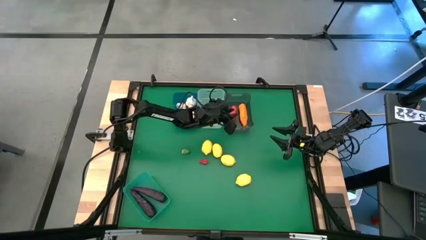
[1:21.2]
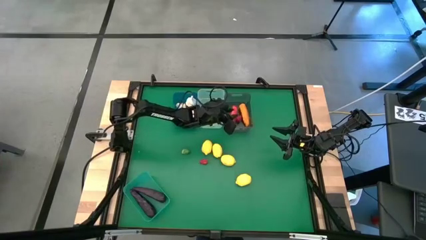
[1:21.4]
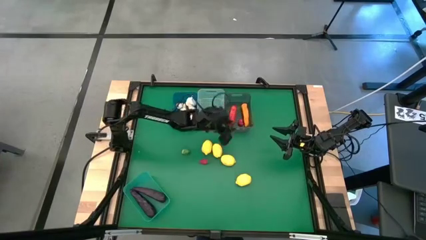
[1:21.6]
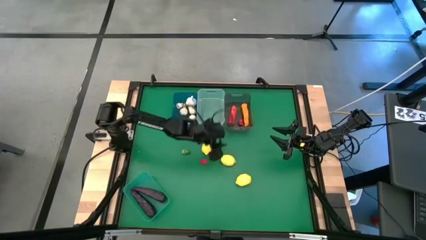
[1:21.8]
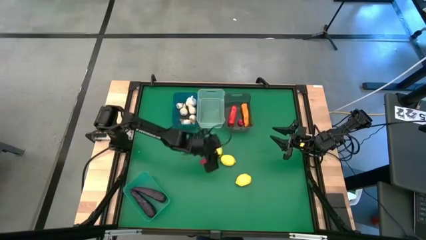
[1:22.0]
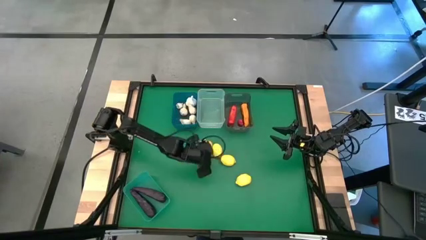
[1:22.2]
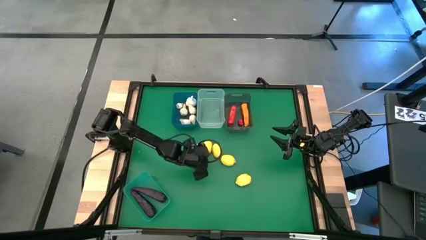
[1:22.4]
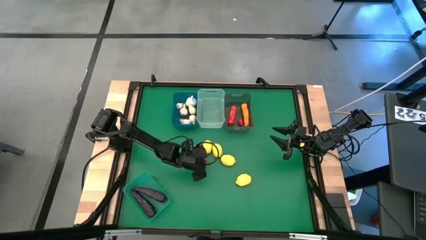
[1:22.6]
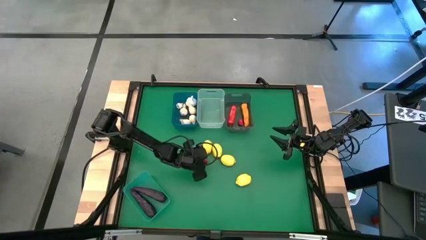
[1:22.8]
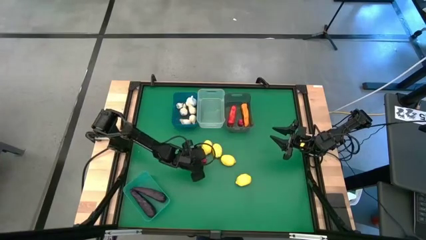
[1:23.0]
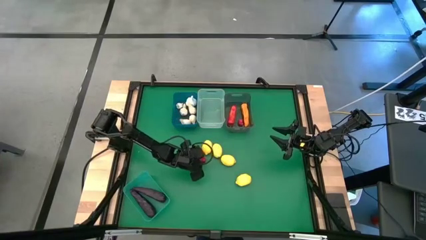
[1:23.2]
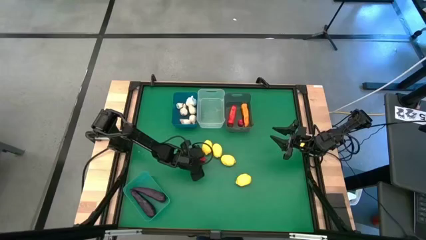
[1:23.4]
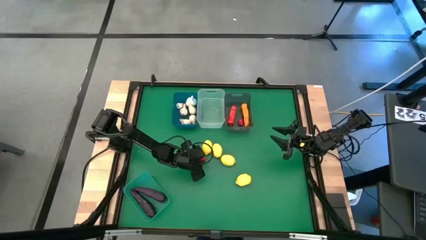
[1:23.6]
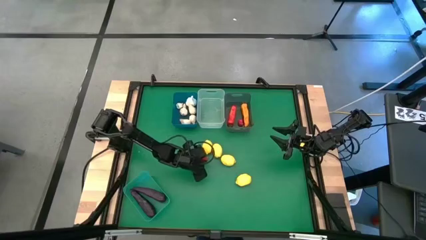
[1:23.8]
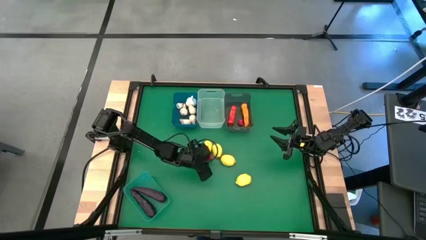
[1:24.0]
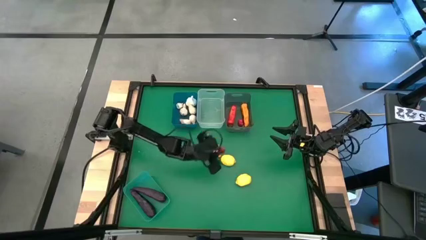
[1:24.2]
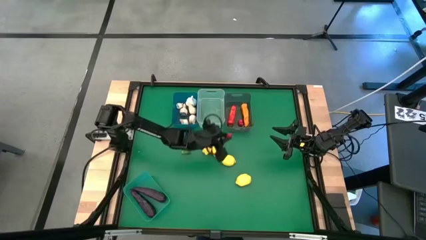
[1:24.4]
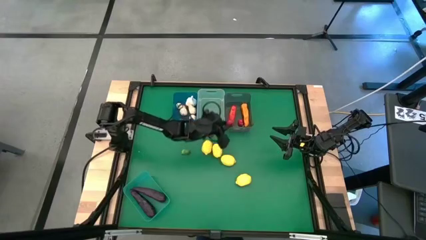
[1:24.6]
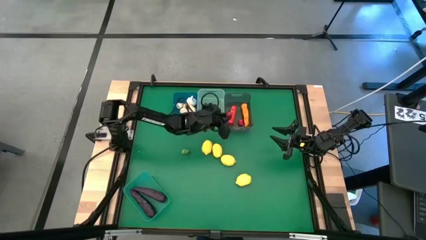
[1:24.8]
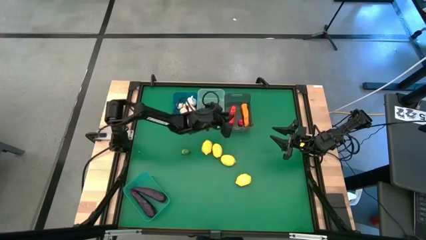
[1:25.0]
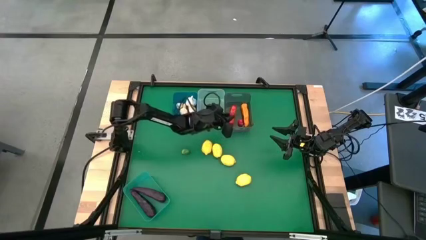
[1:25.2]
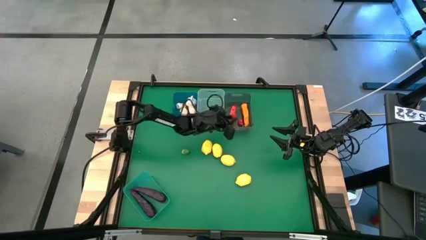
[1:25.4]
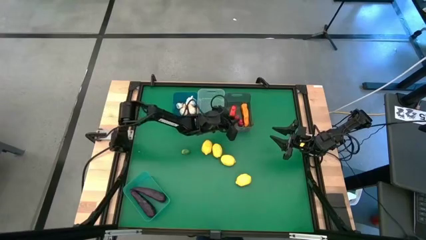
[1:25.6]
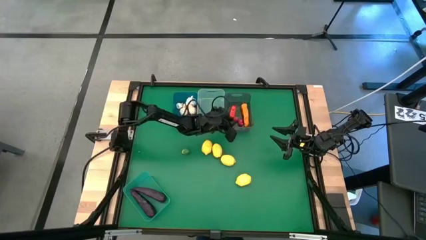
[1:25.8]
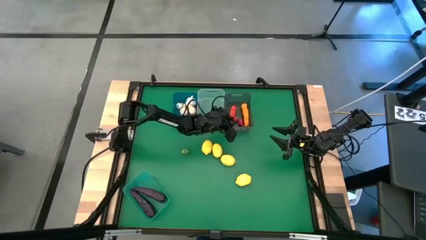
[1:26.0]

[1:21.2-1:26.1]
Task: Sort produce into baskets
Put the red chili pepper into the black bin

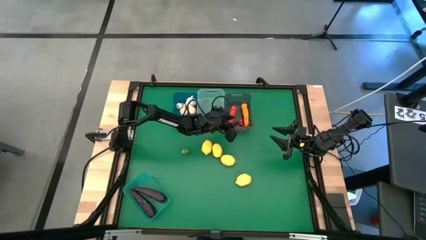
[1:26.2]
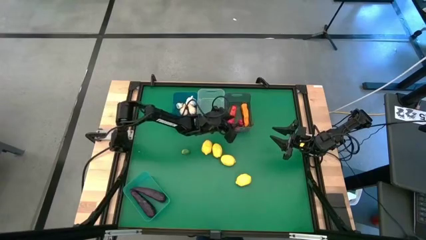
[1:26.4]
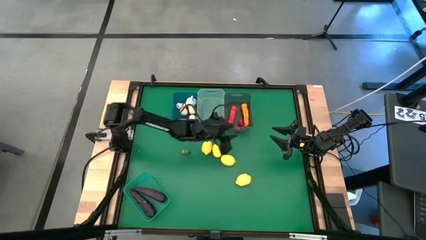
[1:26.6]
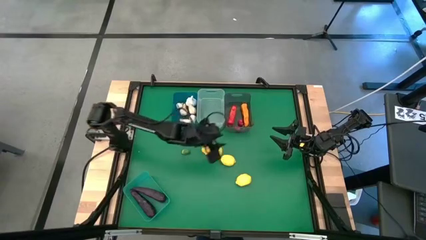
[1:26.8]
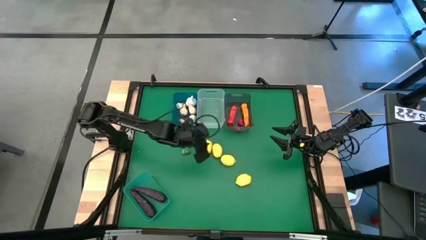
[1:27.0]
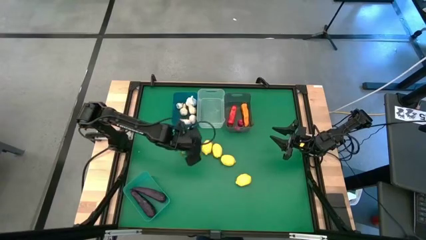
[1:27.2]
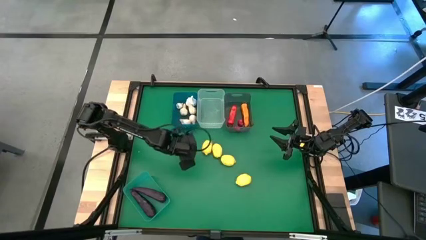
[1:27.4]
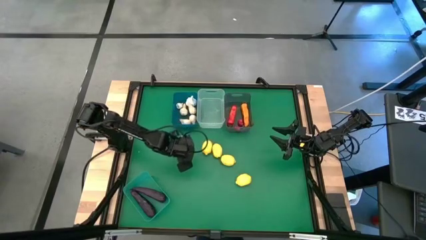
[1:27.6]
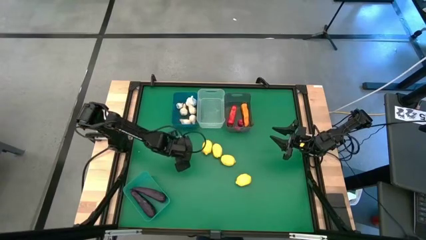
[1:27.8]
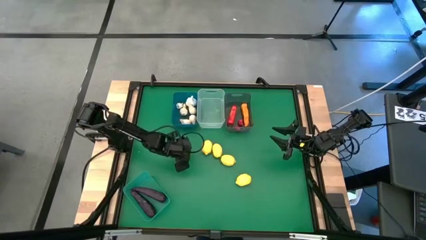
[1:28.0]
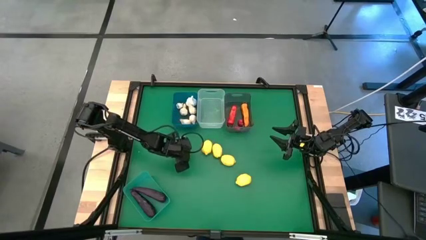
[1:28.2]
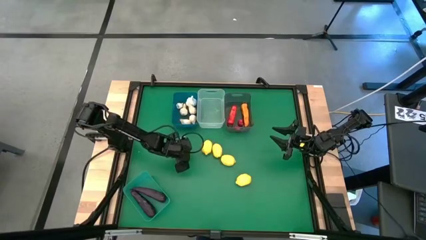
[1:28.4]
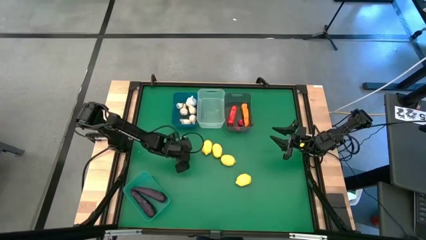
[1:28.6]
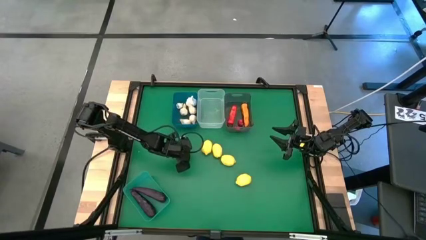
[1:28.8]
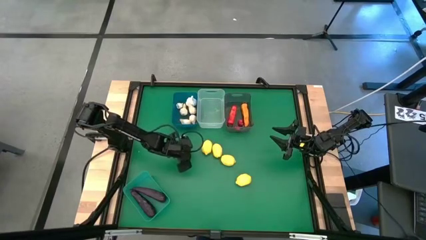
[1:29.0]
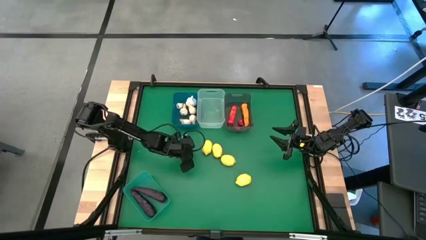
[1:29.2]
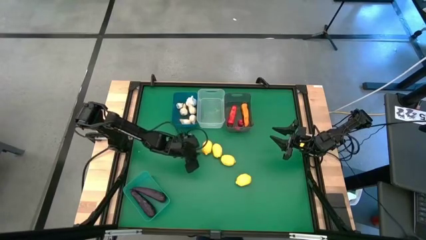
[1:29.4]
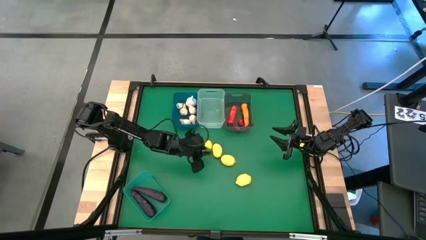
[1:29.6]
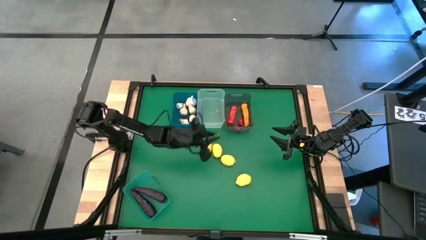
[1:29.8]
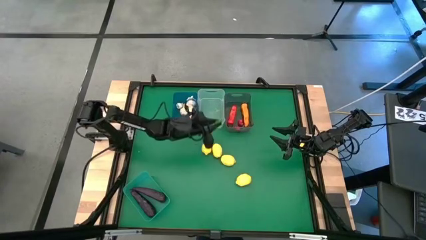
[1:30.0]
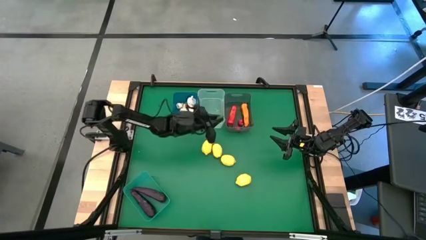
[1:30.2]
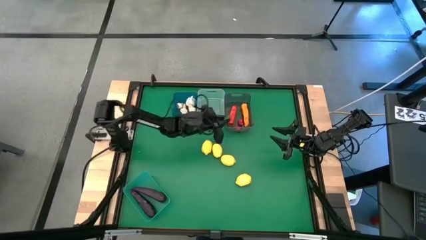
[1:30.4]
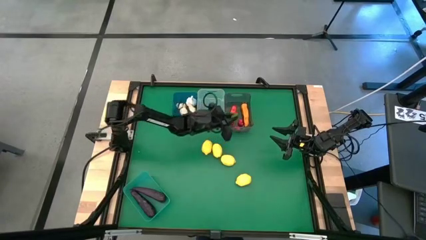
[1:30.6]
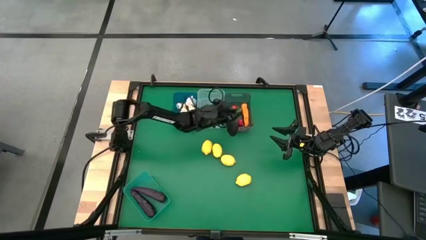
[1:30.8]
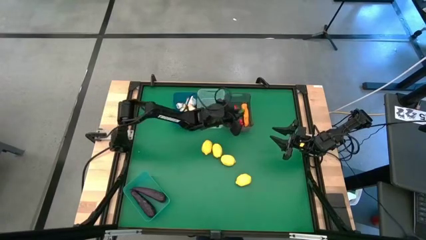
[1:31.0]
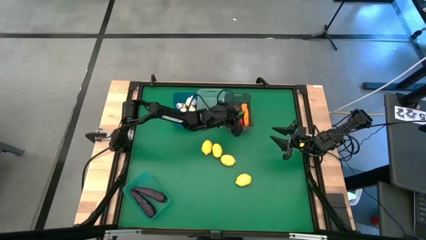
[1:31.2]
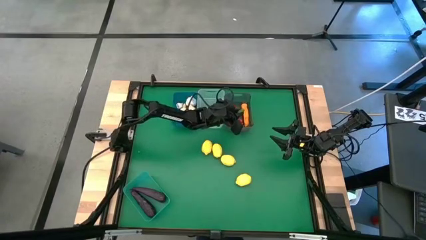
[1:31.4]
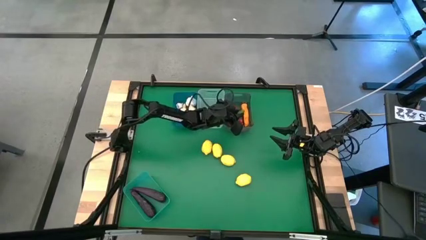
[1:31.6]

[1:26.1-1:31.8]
Put the green chili pepper into the black bin

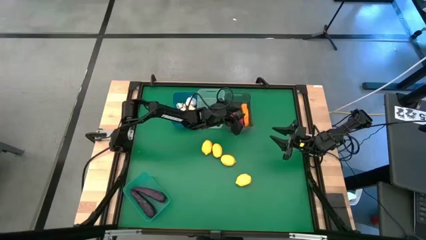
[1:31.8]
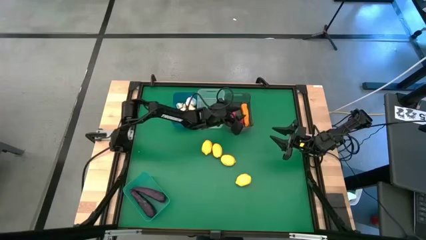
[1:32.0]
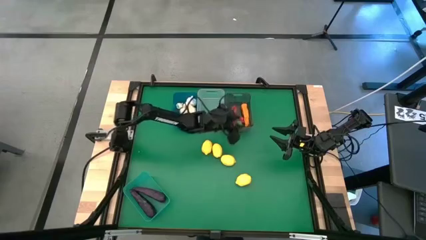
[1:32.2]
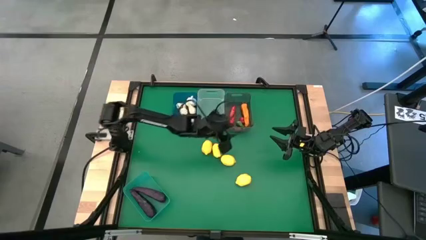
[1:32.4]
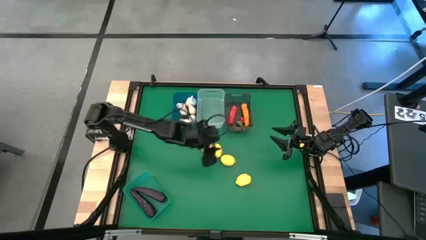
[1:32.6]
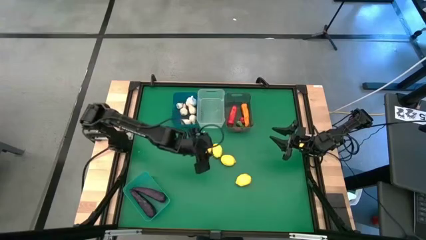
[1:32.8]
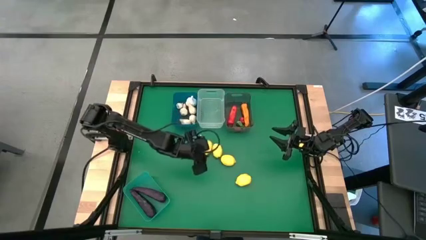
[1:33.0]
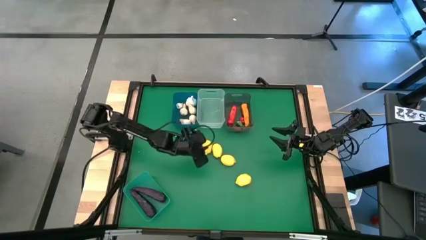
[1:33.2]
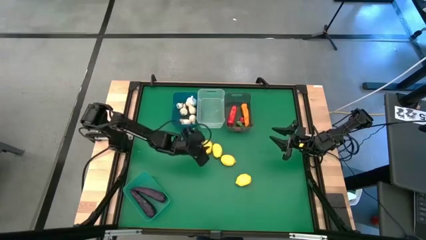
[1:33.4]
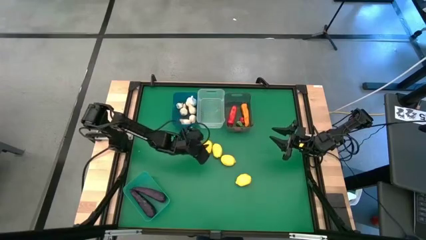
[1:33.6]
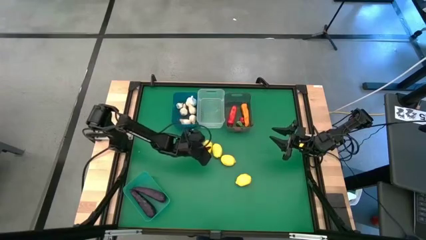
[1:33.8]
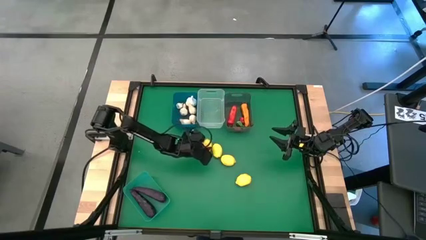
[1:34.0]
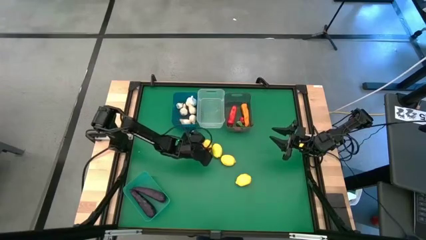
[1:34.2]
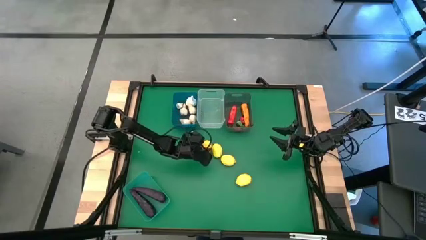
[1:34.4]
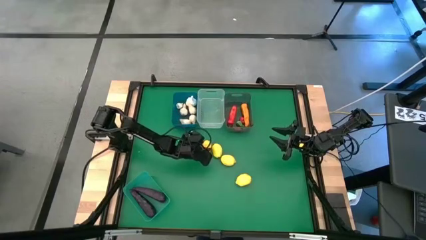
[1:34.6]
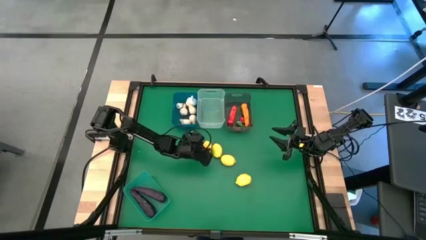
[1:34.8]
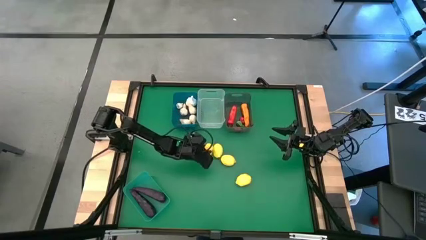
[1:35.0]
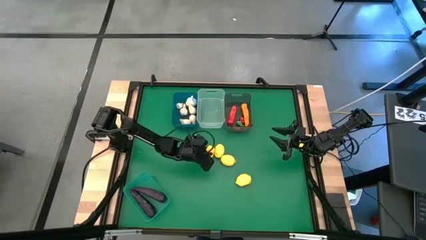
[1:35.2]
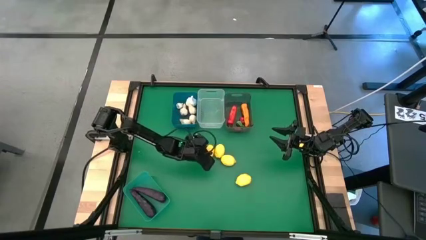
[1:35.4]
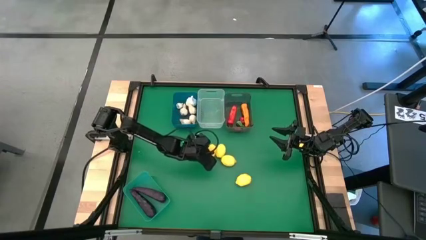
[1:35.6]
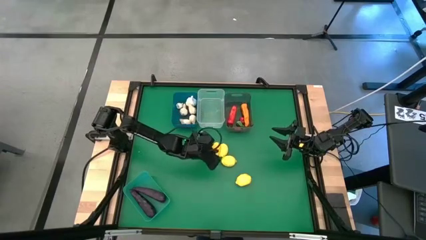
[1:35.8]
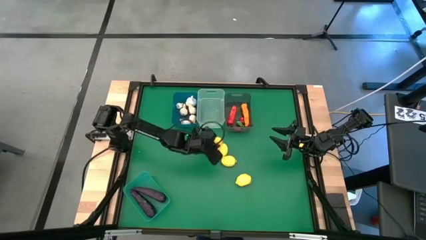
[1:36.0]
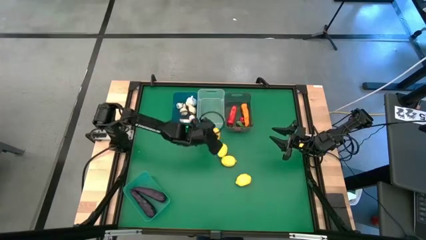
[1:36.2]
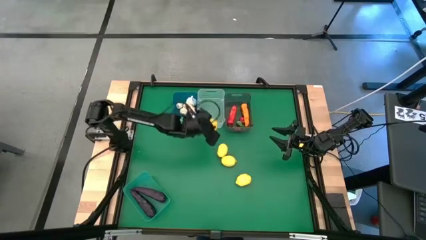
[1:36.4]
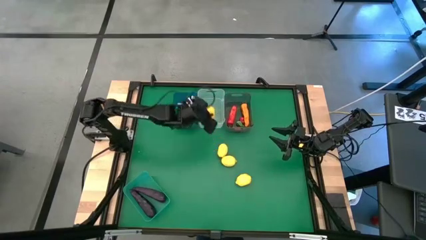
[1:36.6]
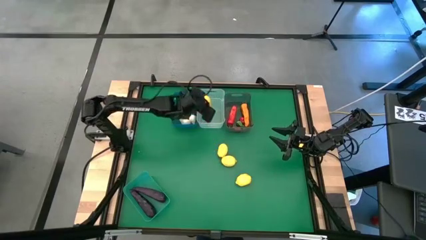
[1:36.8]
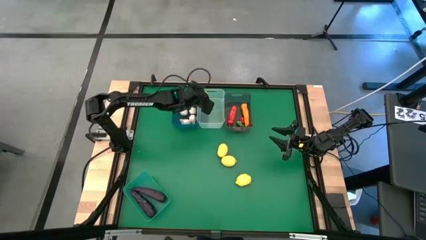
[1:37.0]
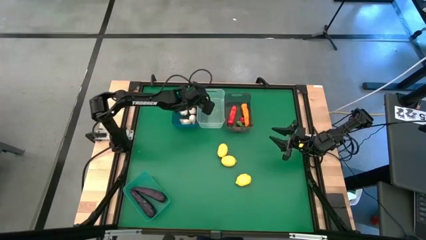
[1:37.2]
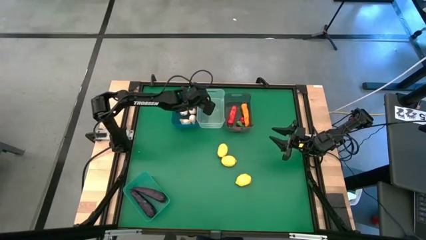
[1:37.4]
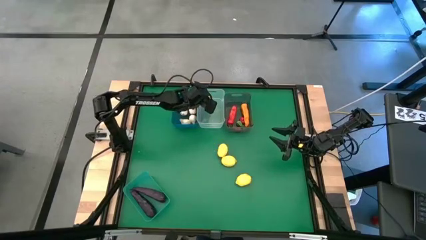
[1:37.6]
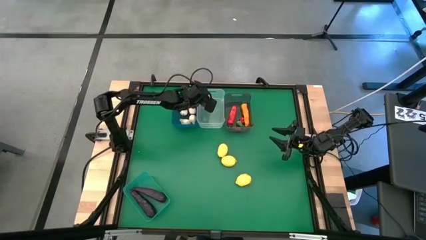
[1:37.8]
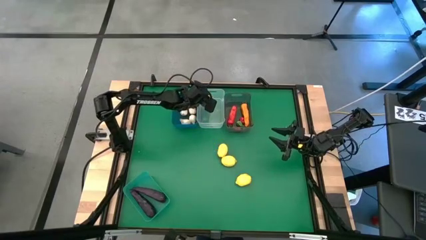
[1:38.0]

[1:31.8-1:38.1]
Put the yellow lemon into the white bin
